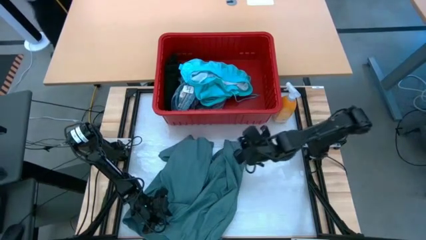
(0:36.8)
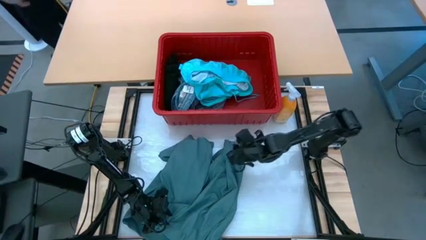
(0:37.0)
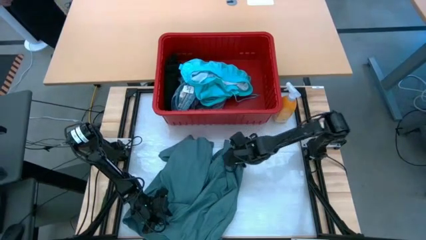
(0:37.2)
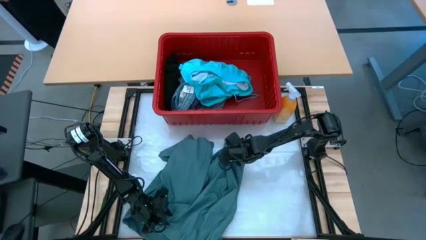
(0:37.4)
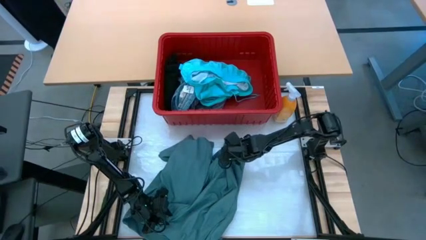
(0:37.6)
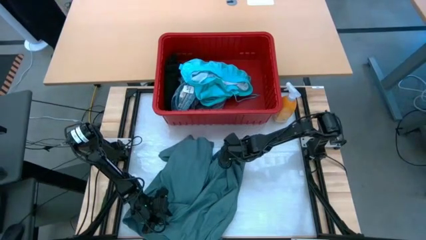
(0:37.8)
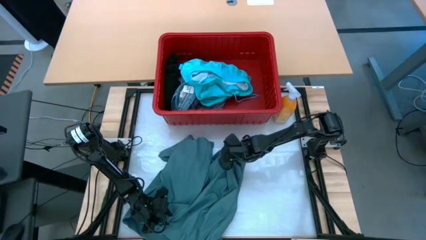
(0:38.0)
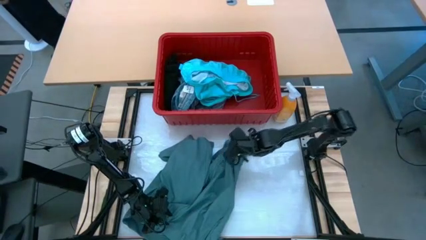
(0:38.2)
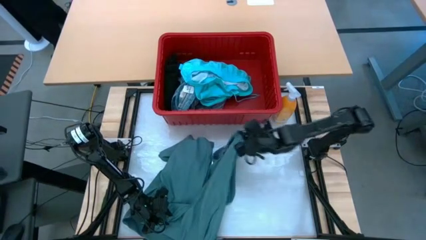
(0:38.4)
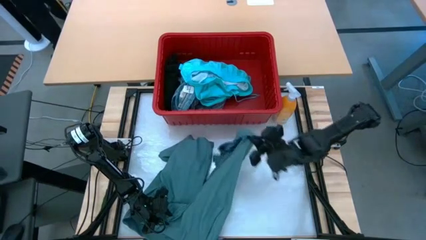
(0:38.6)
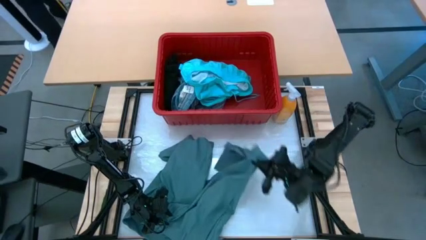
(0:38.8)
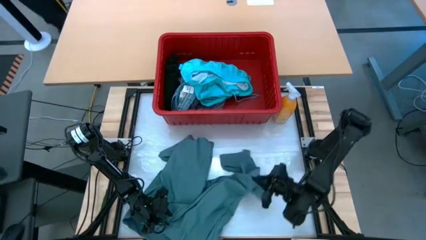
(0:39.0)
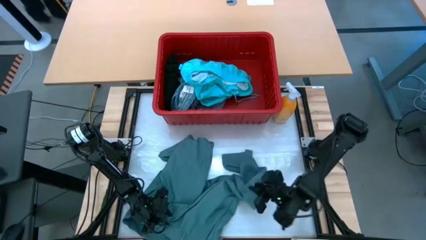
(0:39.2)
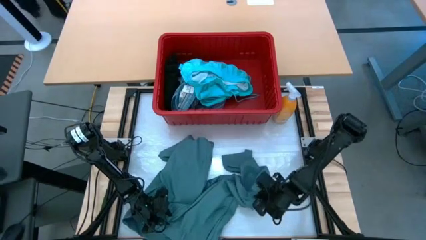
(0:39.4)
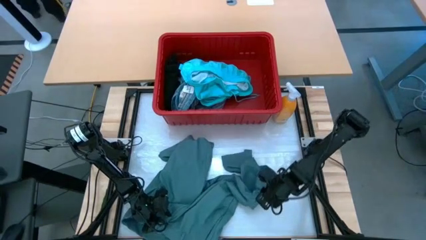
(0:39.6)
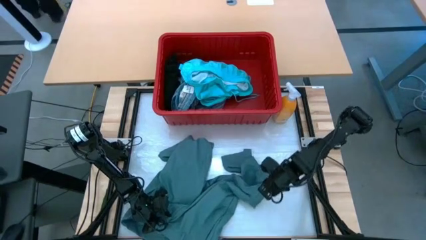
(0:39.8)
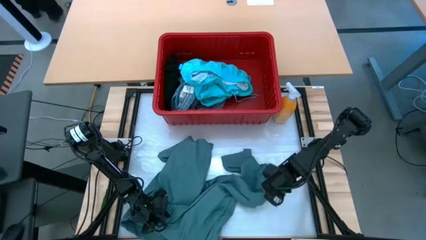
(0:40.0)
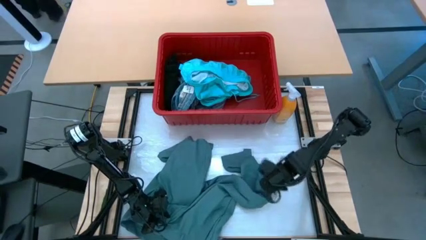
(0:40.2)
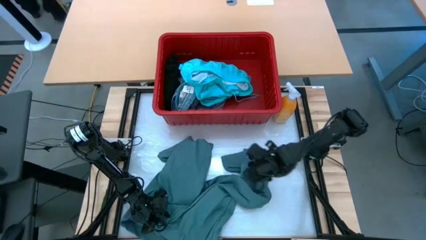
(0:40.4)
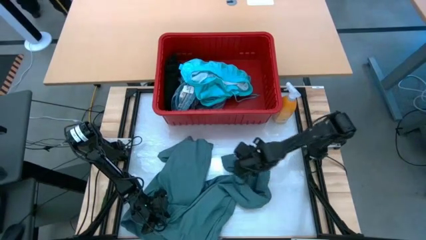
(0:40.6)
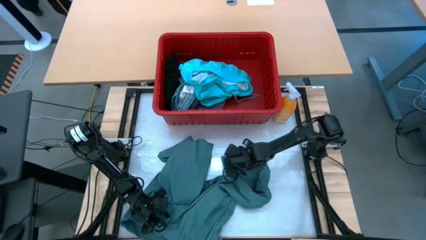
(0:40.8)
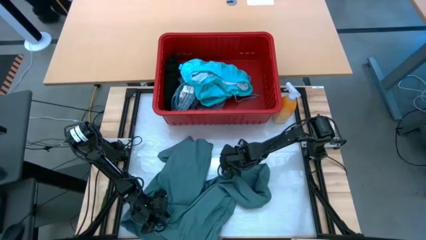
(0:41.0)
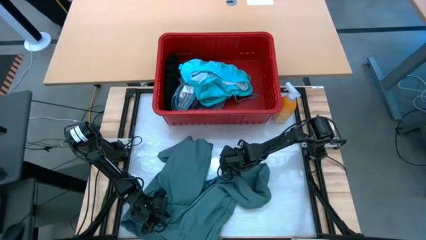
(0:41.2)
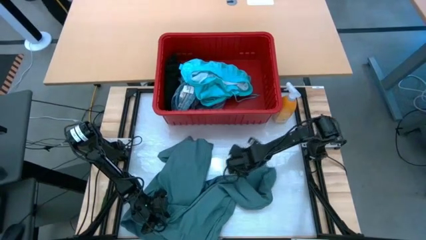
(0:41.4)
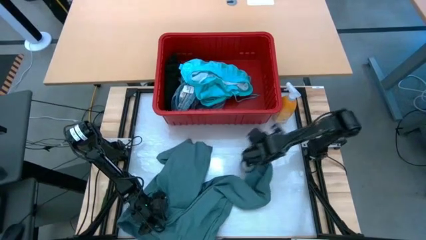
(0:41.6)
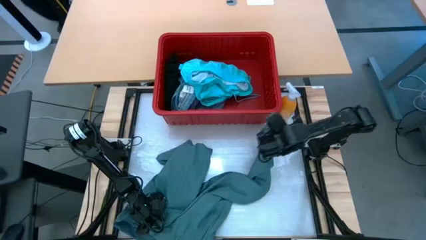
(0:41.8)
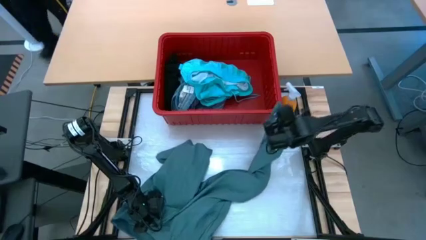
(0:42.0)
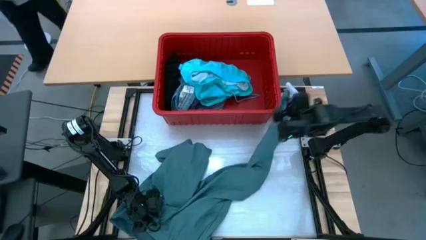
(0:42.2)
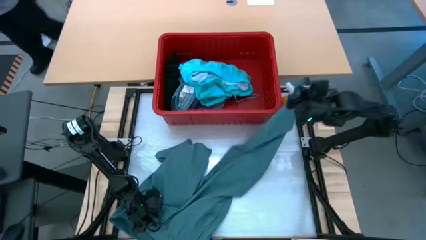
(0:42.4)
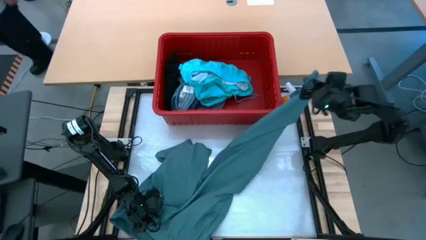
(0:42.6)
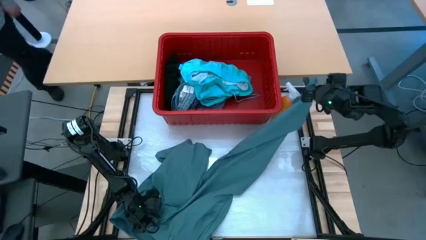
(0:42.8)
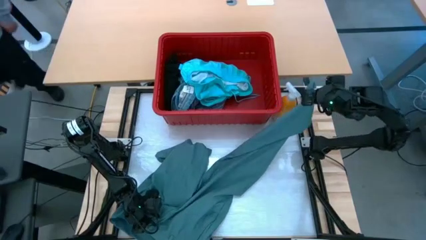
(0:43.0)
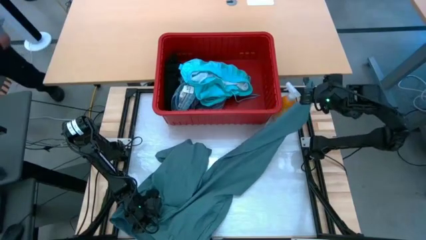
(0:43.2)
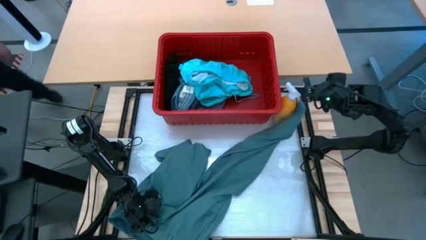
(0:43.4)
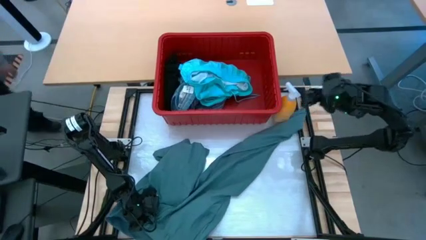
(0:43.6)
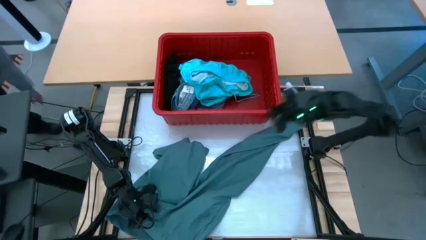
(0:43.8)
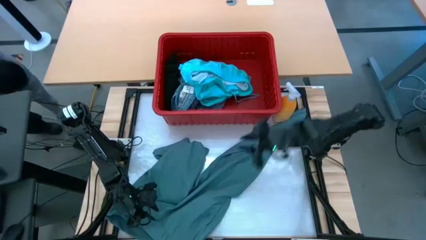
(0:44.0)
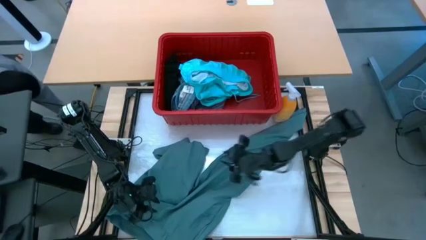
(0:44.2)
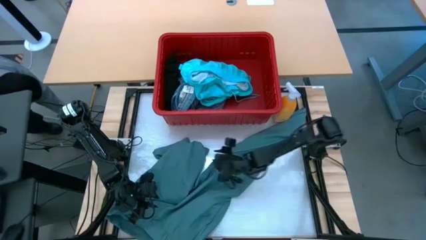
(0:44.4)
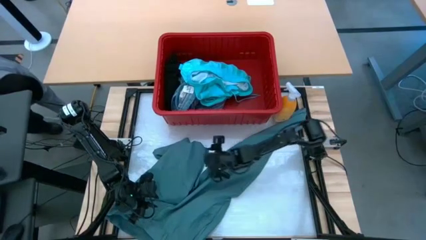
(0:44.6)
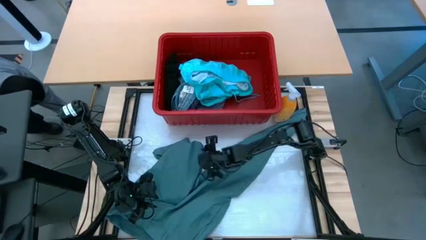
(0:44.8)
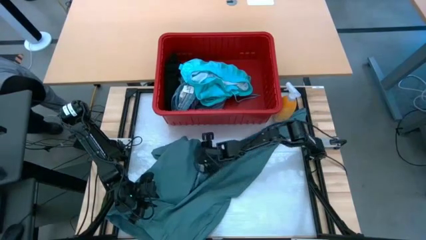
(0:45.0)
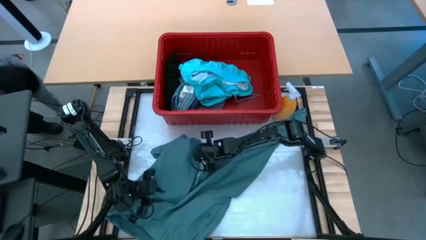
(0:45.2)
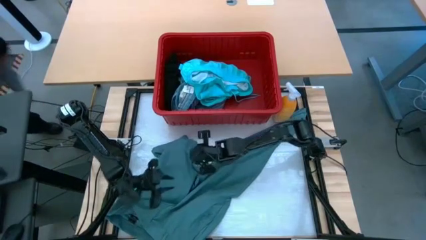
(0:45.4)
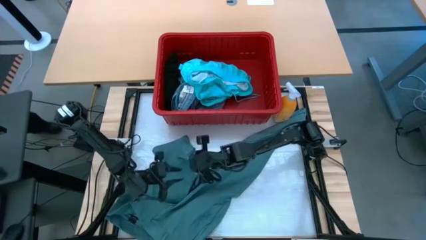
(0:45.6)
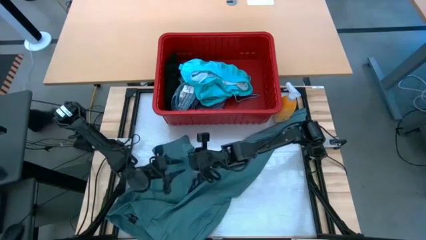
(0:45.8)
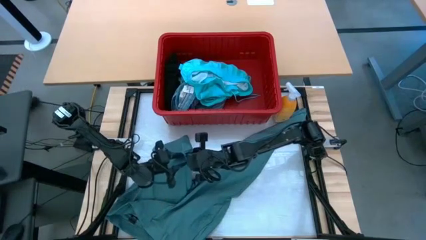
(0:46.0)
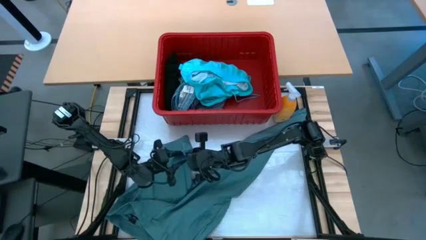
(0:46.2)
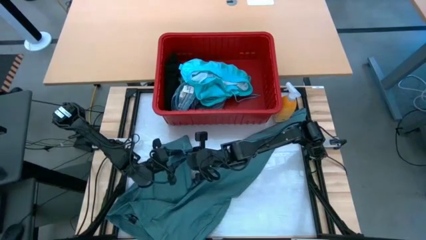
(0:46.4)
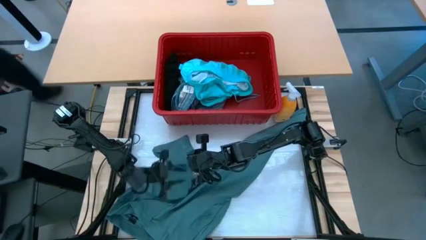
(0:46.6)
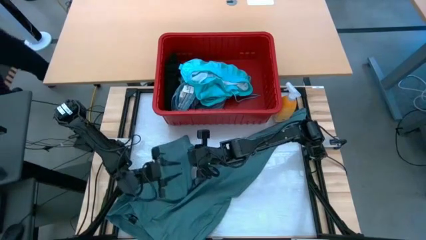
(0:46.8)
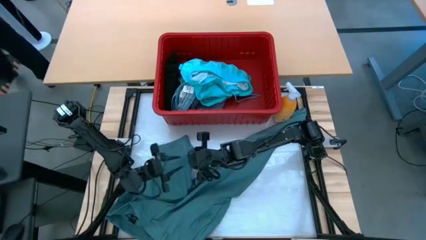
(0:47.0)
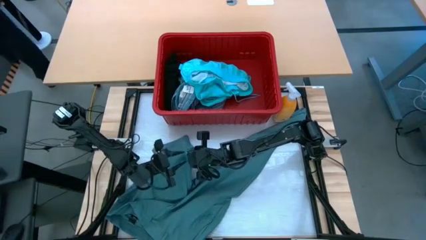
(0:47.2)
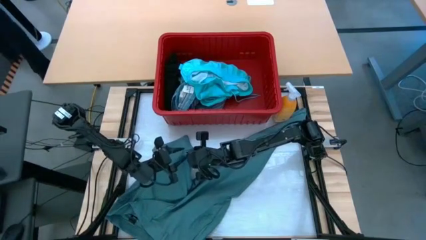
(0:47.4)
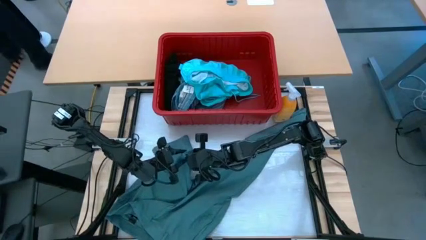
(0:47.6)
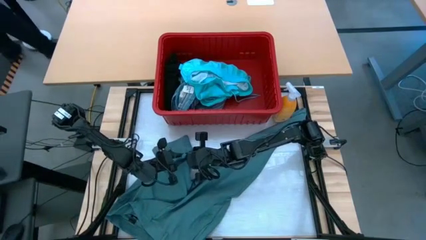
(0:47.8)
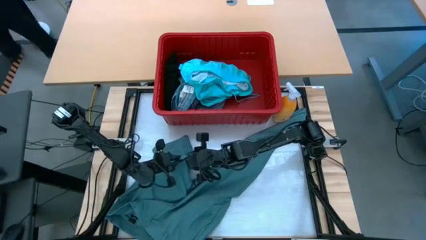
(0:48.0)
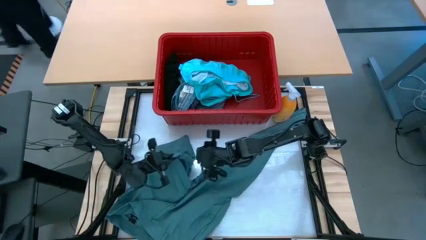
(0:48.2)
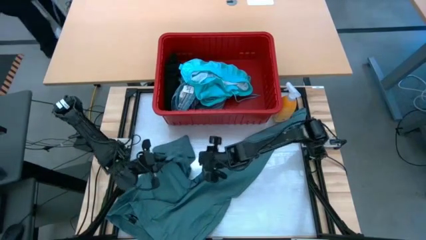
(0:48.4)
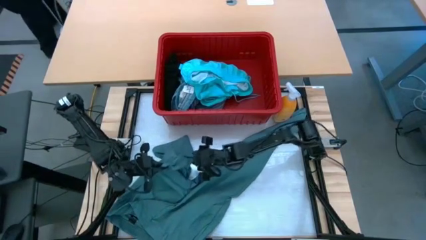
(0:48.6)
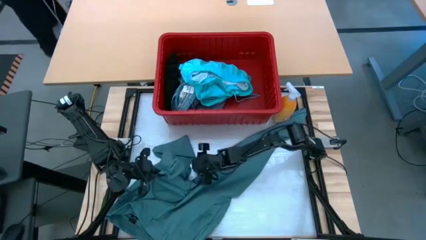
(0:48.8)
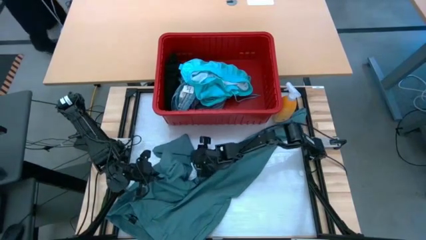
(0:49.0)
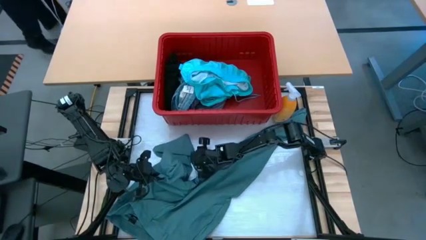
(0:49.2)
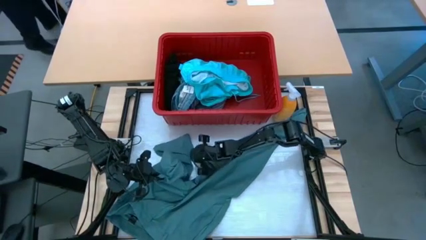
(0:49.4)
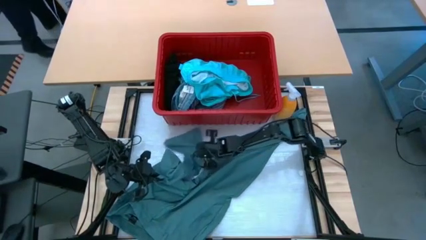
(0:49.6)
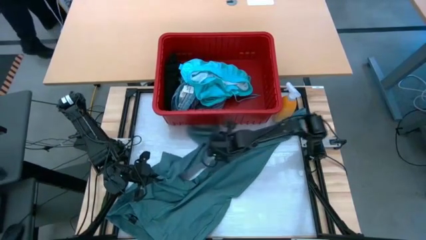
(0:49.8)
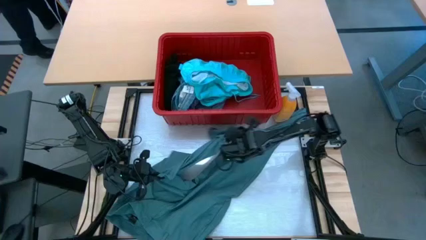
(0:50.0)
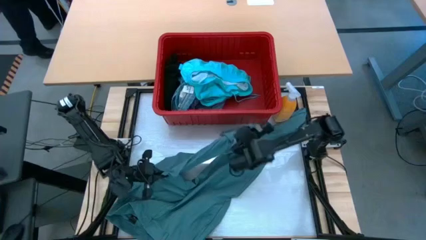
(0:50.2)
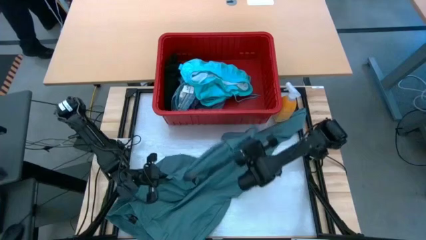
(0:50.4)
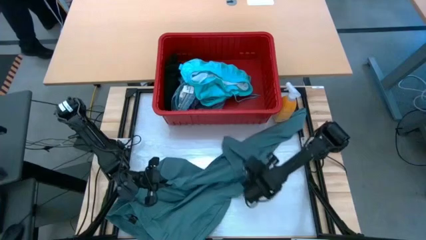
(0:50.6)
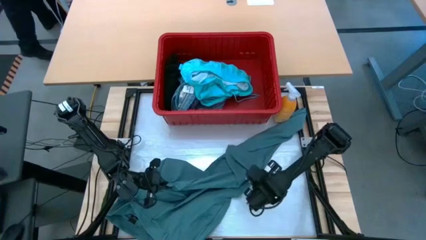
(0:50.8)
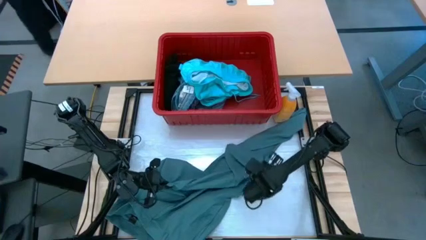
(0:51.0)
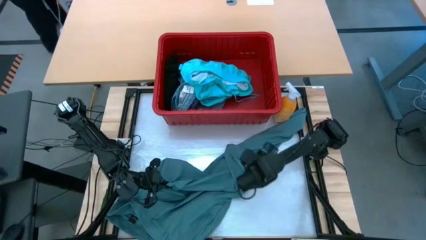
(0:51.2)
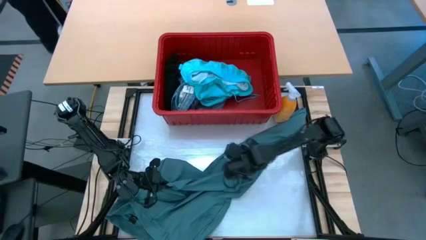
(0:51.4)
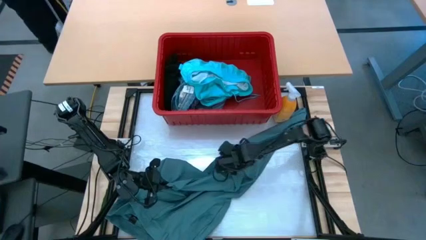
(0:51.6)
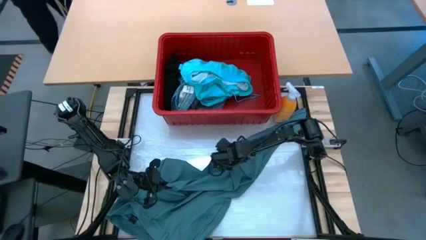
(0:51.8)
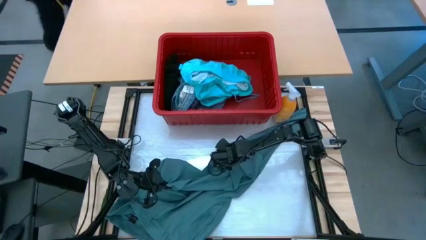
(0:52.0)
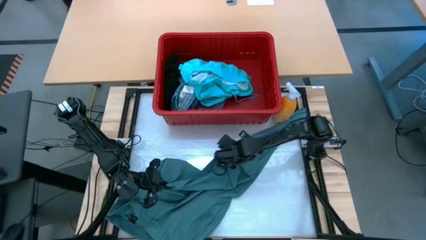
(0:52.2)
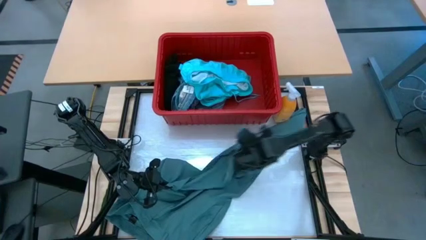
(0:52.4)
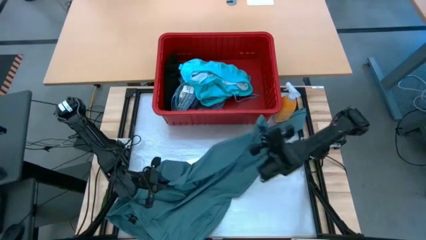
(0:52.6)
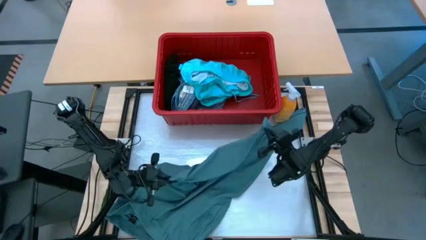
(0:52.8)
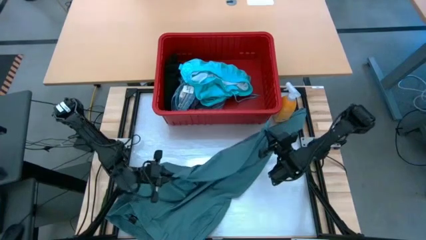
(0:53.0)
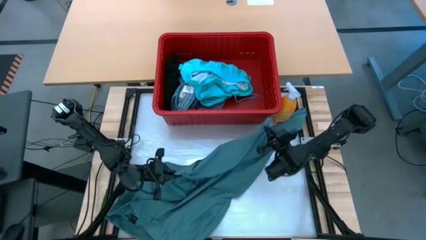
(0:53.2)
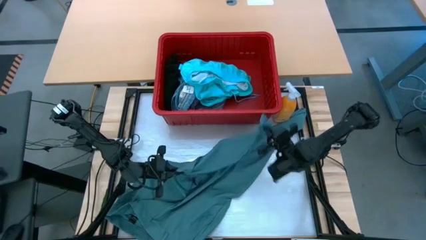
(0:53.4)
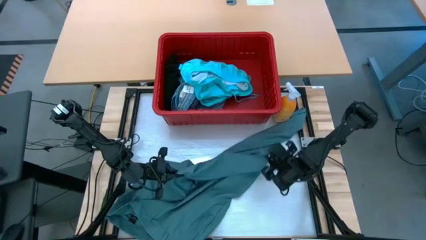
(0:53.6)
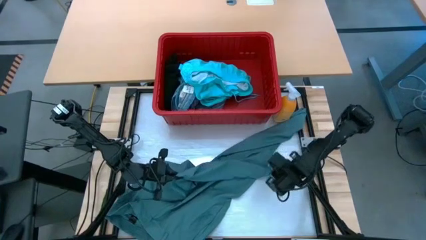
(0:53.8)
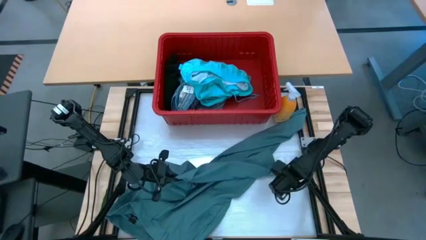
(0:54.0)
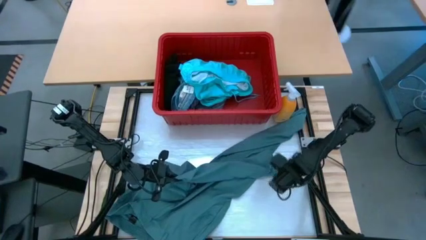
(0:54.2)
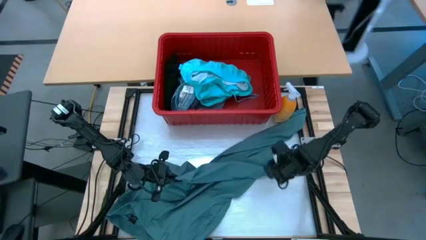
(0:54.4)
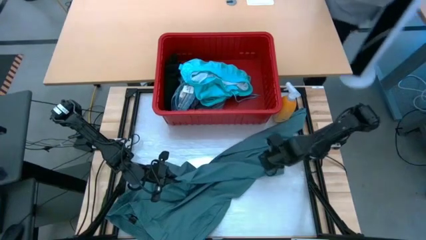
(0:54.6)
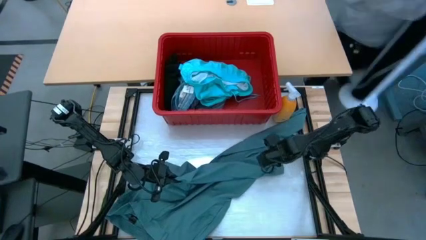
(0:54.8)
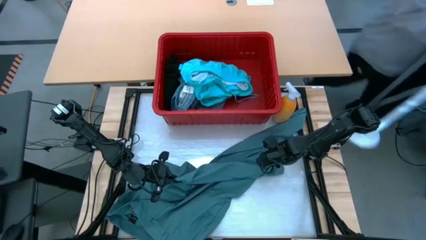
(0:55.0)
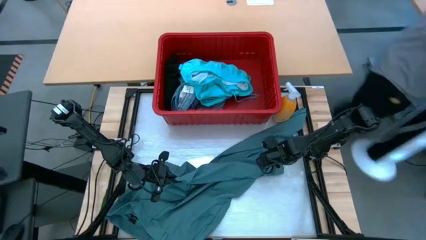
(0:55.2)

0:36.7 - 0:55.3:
Task: Fold Laundry from Bin
Fold the light blue pants
